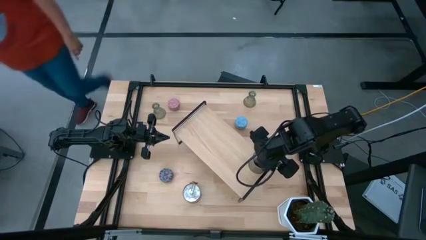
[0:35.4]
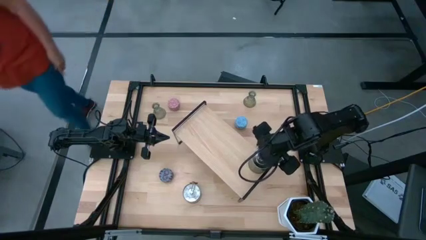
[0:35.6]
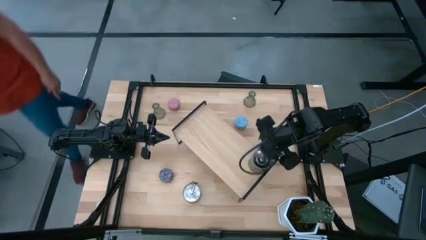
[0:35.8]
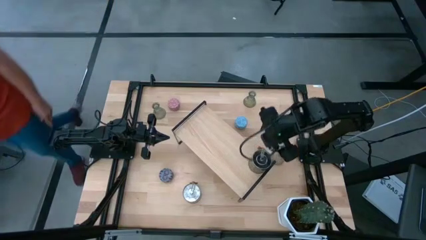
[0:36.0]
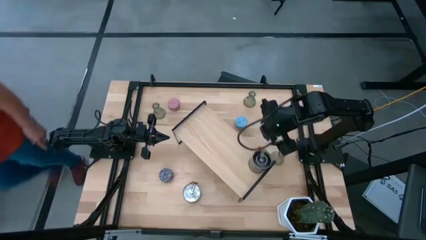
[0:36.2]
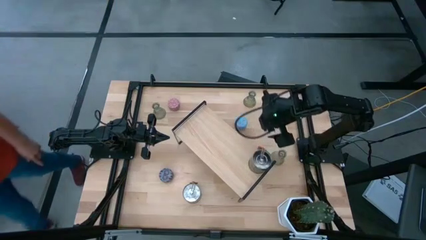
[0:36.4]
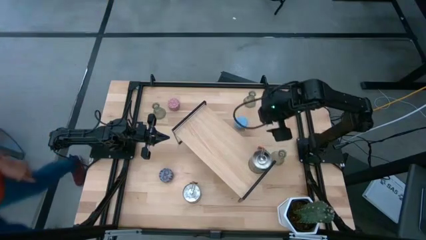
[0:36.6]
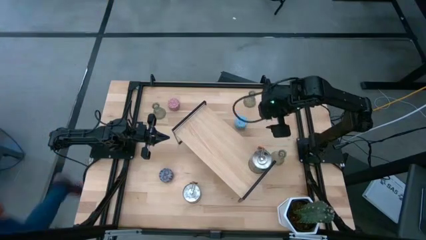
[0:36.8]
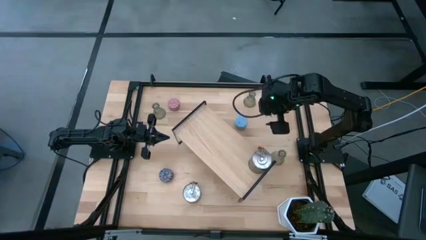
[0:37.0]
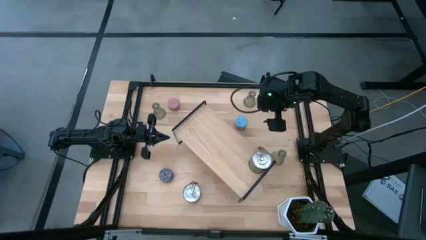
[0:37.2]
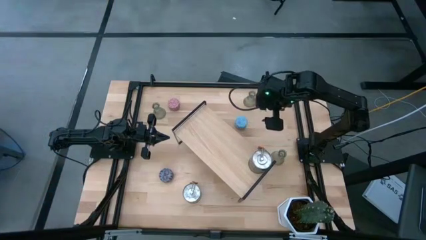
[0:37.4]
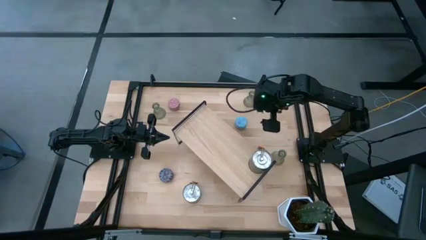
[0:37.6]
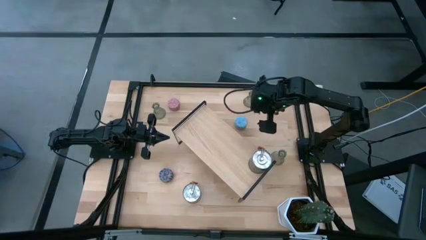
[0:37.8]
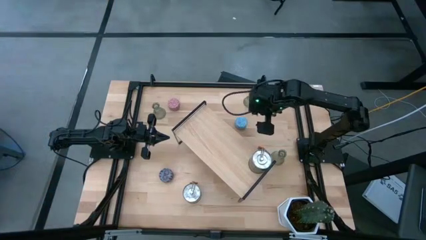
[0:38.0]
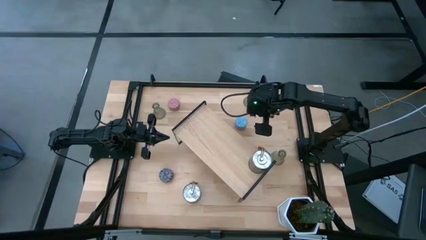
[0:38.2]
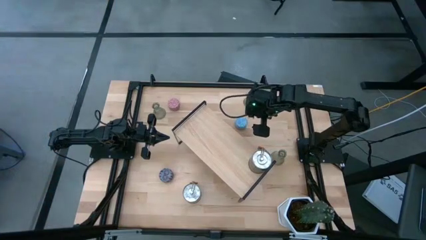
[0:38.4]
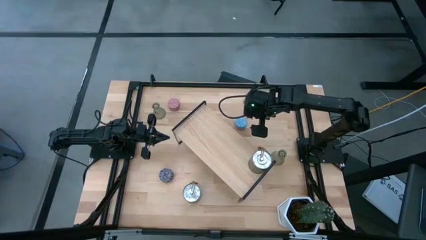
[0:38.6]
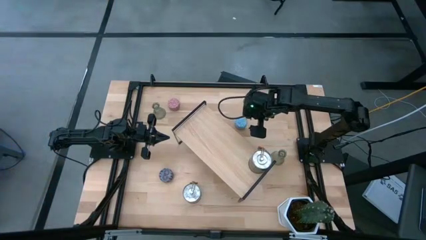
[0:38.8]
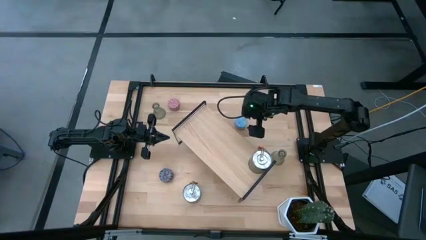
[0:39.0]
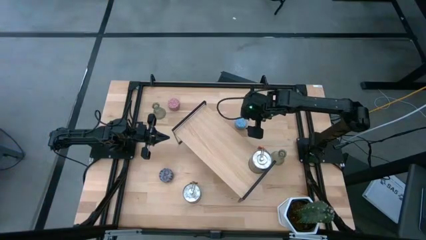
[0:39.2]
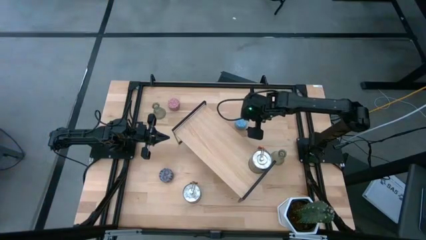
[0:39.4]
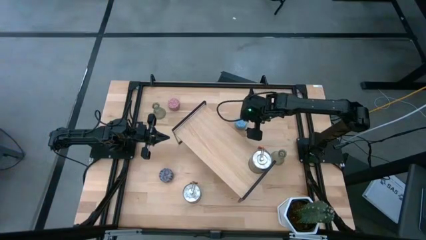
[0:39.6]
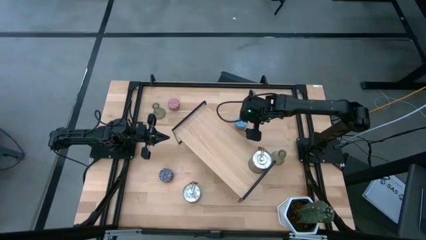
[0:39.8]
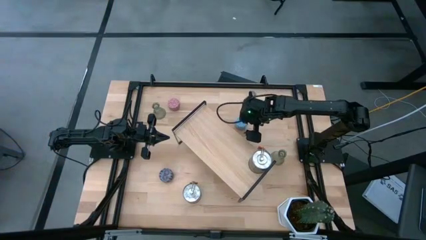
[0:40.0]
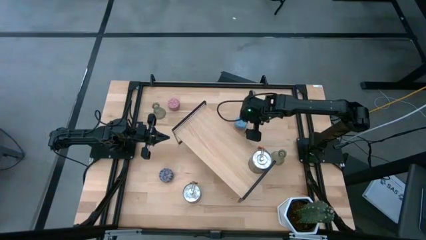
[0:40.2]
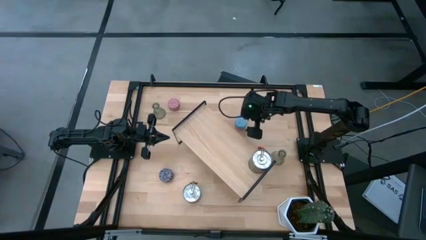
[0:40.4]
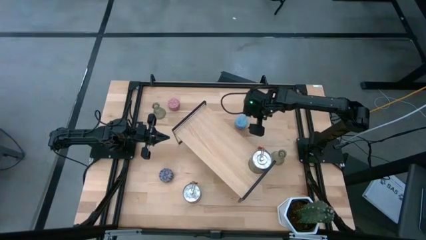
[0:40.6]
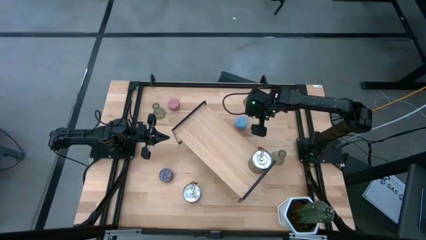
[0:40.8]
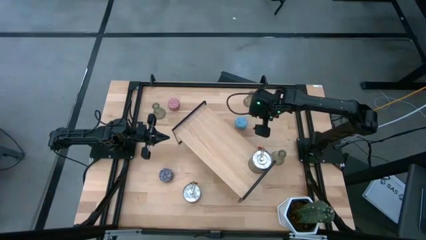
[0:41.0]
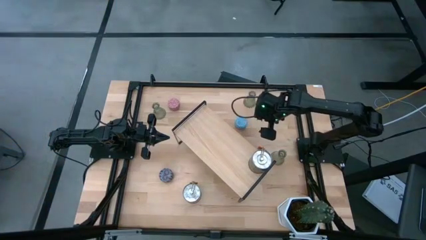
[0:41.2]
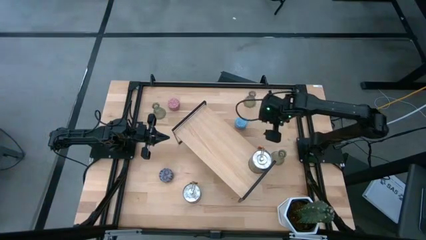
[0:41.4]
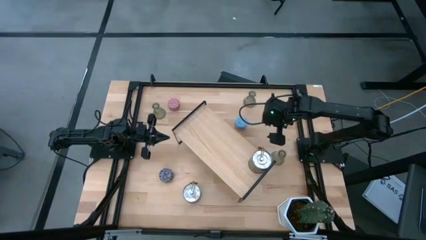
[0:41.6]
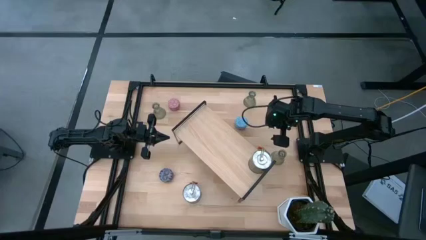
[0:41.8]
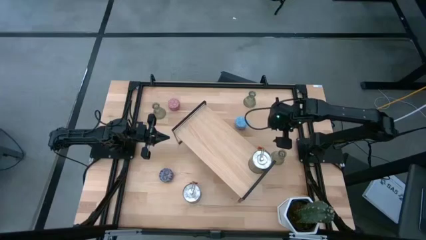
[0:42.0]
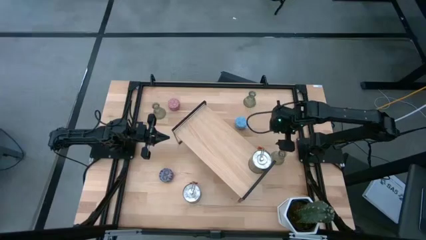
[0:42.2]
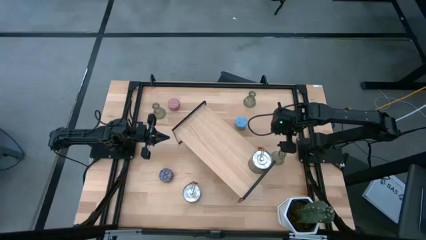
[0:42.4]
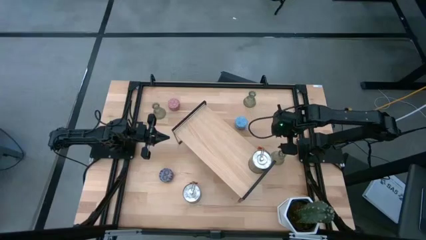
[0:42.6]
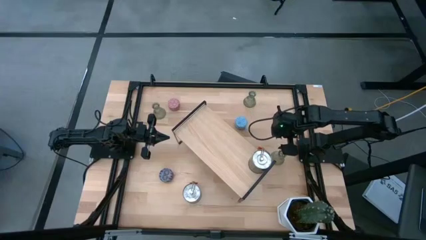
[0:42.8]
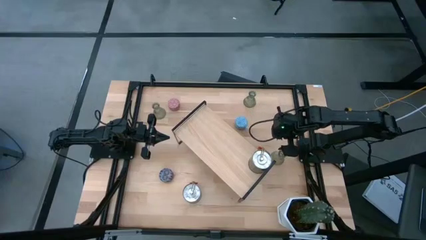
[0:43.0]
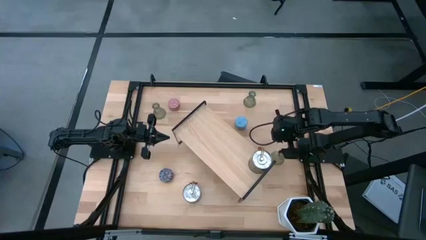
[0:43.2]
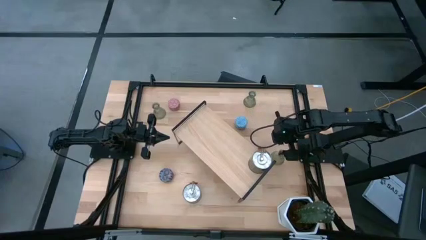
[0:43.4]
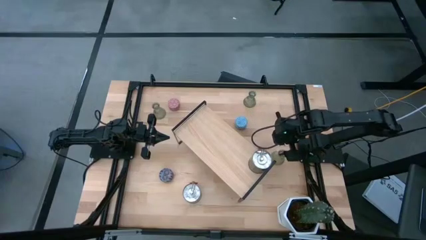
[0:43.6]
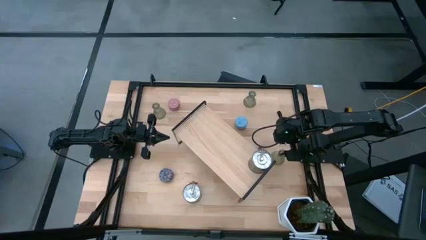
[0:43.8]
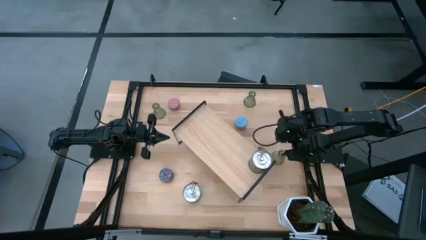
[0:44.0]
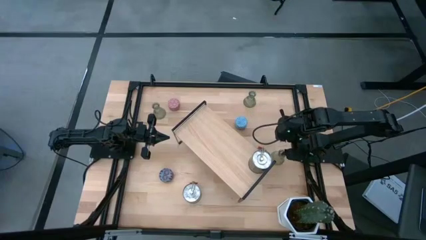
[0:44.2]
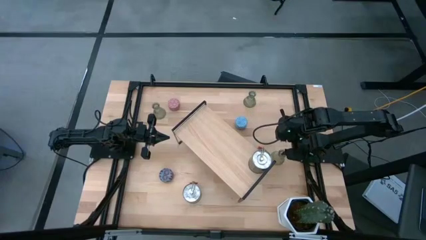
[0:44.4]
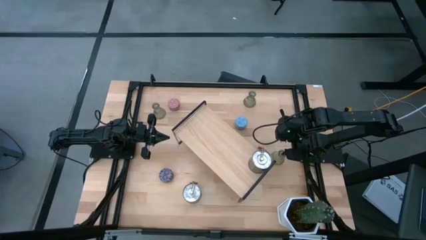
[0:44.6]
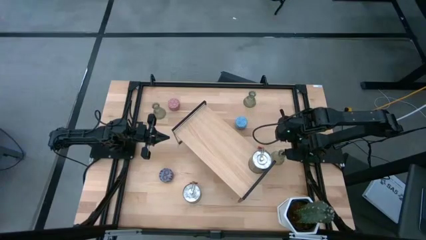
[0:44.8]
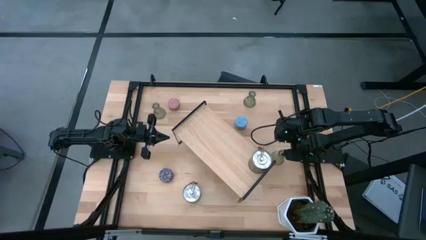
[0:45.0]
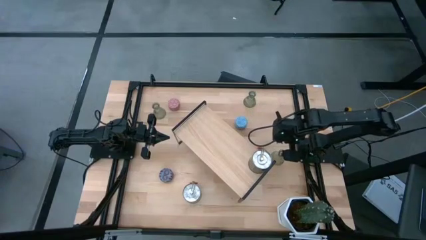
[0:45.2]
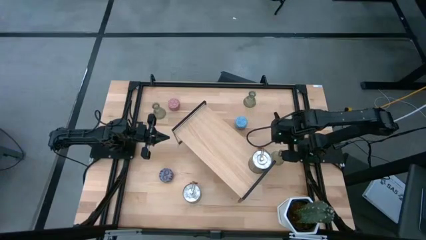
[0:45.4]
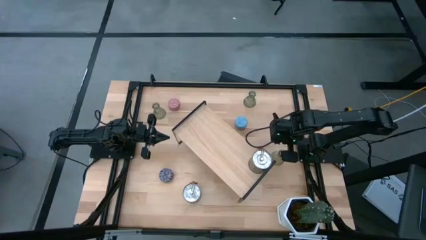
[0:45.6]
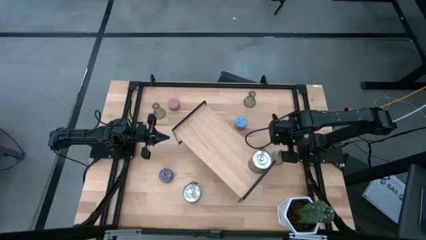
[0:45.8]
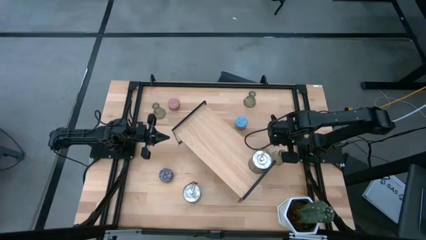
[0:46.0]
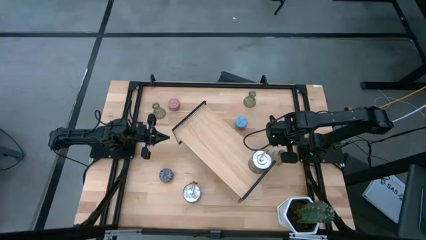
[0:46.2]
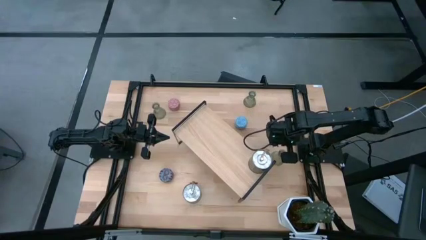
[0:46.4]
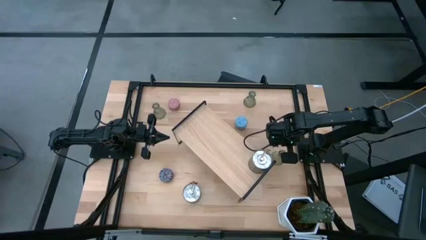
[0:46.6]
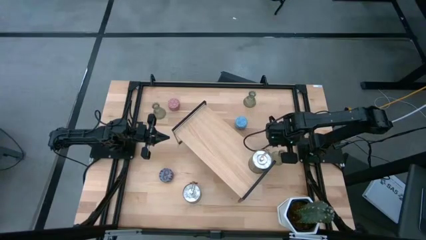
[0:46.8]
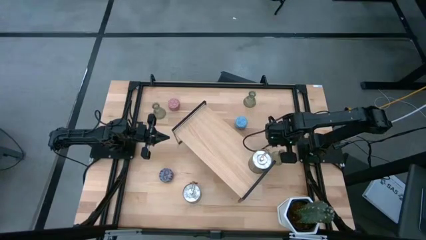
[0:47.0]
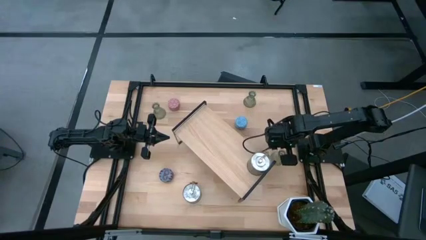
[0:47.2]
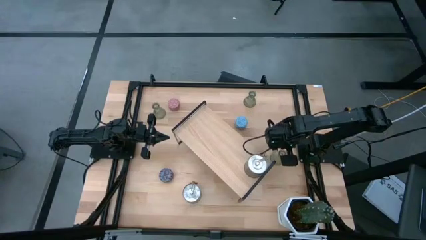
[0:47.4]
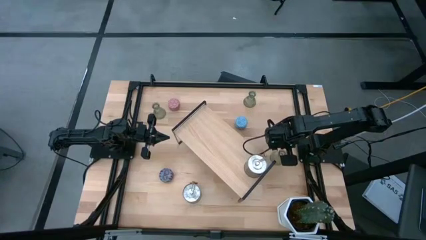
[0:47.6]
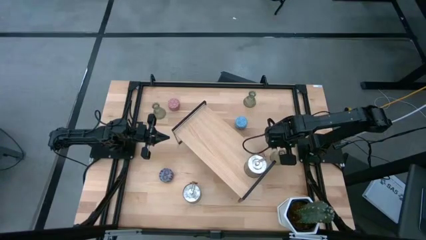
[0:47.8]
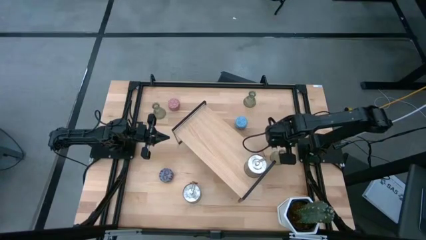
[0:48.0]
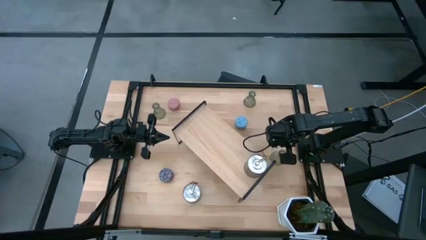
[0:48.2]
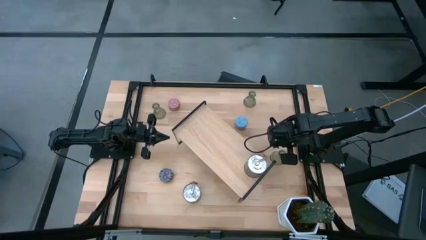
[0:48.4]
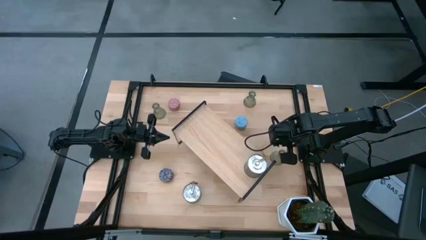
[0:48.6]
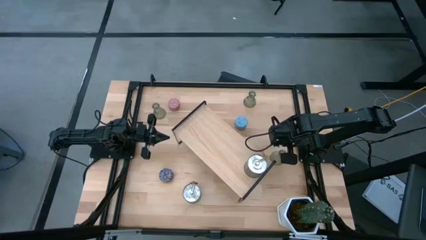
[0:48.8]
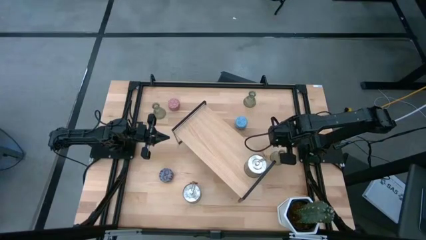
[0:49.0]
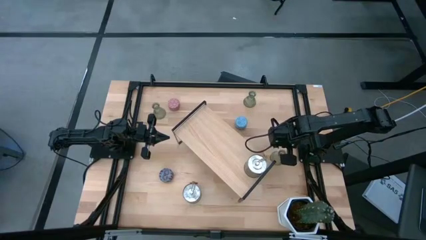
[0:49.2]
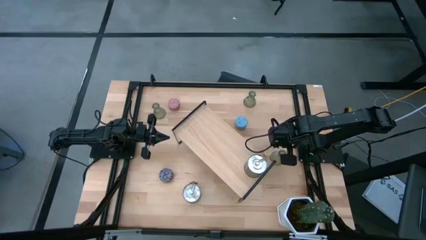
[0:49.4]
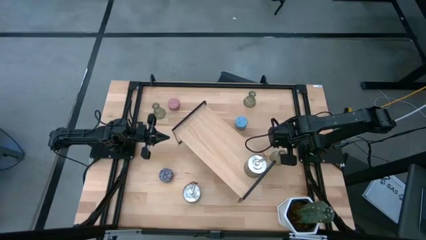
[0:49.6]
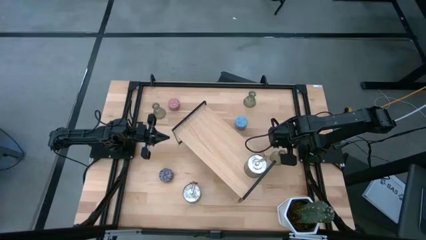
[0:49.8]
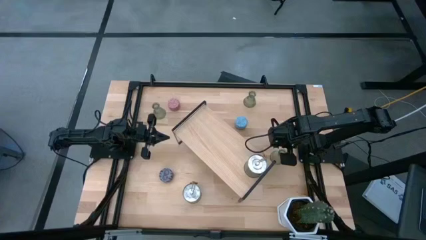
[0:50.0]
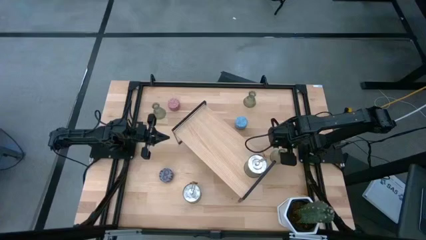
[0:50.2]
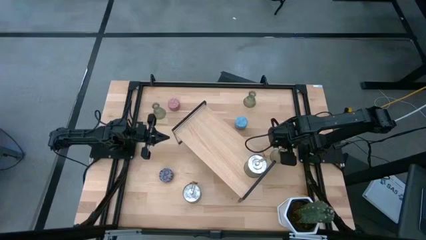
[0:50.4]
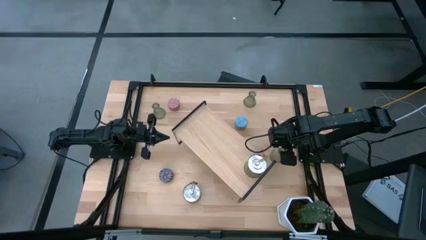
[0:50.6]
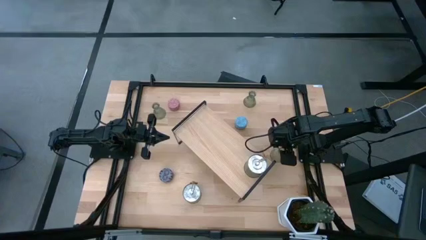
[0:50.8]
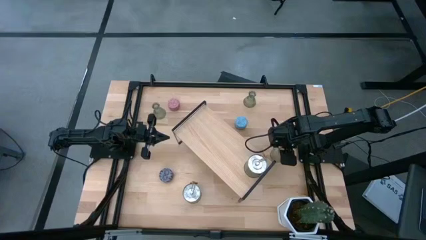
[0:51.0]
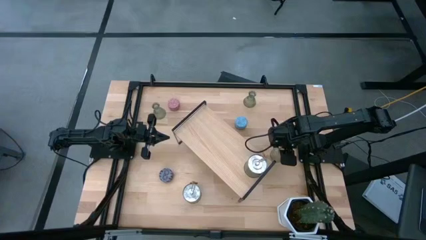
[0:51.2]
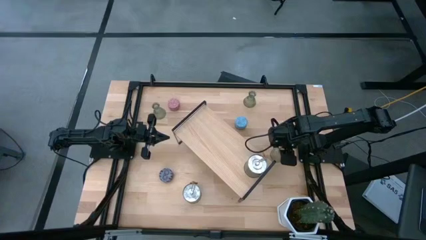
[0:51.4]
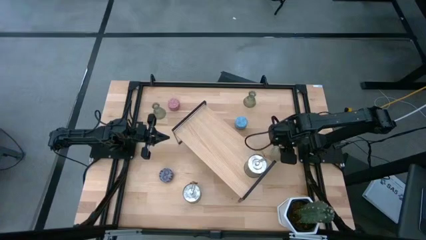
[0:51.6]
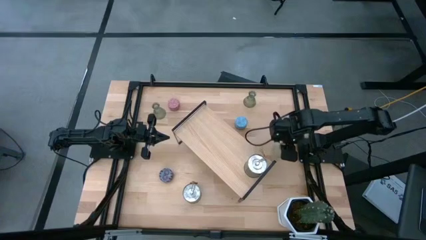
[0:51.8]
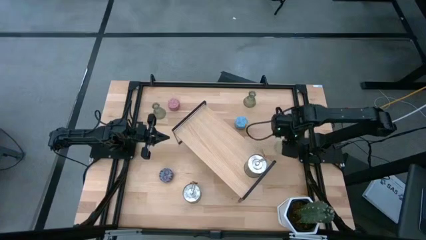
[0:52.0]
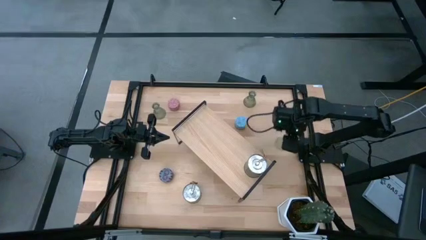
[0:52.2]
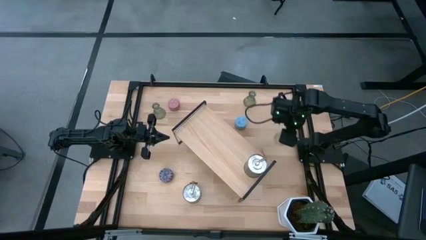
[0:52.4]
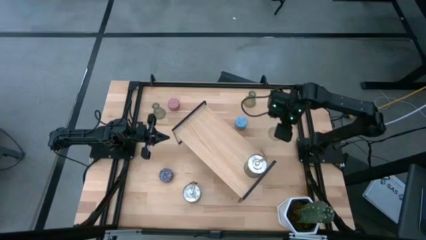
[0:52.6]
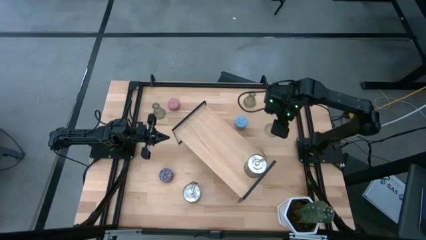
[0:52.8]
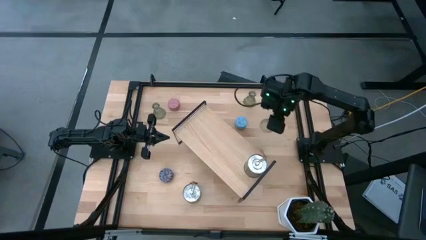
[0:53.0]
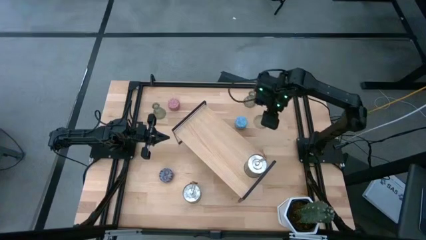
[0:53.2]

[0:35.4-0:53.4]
Task: Pick & Place candle stick holders
Put the right transparent candle holder on the shelf
